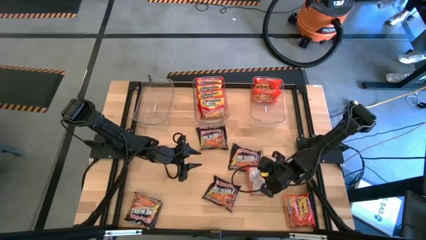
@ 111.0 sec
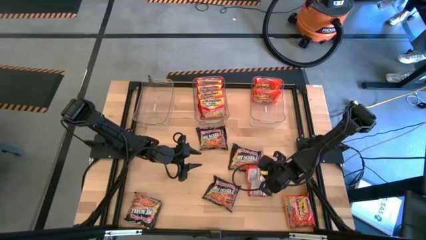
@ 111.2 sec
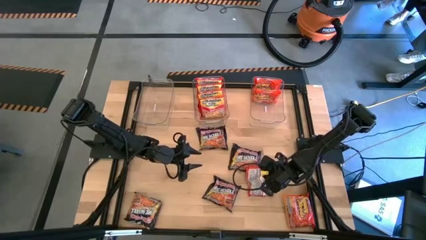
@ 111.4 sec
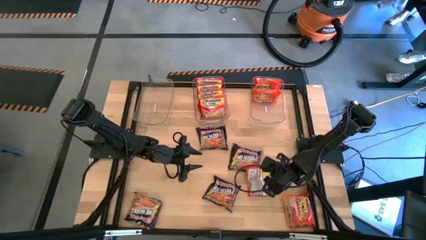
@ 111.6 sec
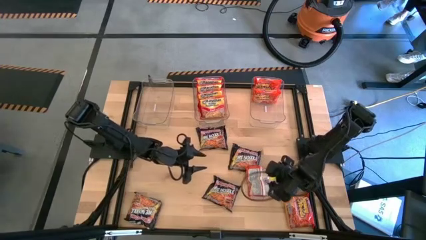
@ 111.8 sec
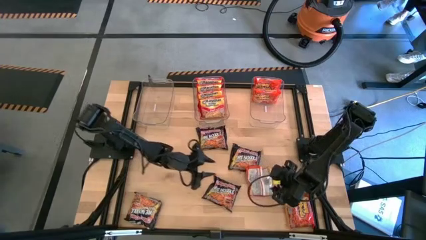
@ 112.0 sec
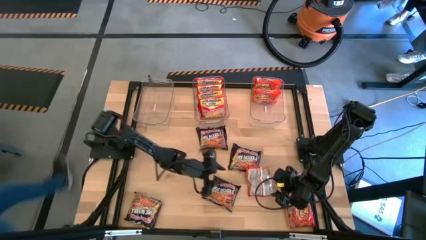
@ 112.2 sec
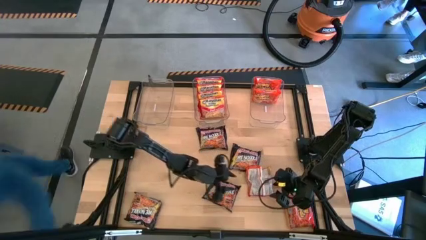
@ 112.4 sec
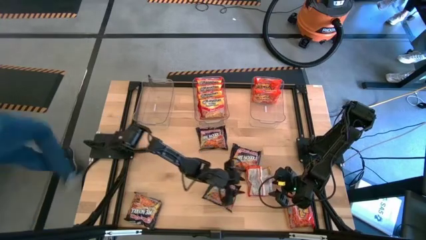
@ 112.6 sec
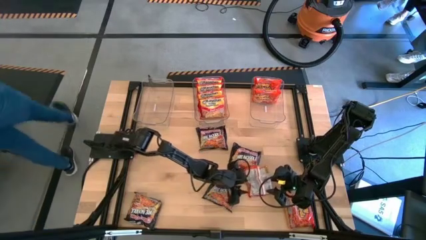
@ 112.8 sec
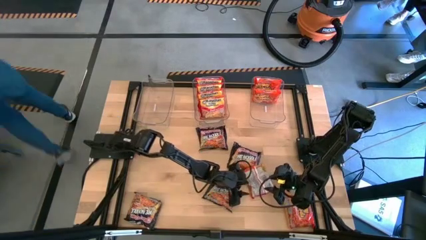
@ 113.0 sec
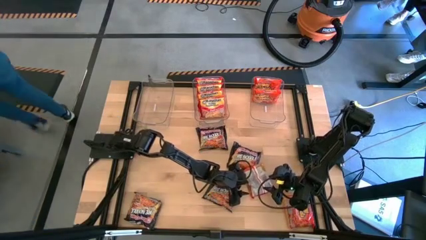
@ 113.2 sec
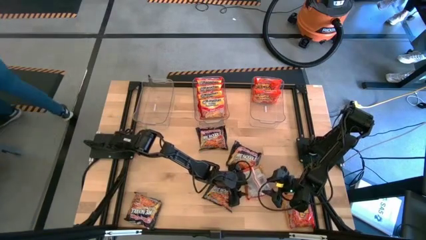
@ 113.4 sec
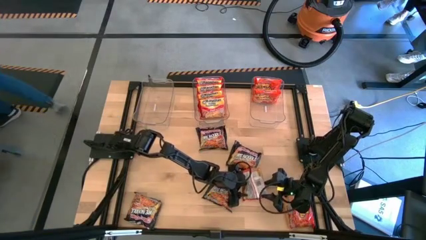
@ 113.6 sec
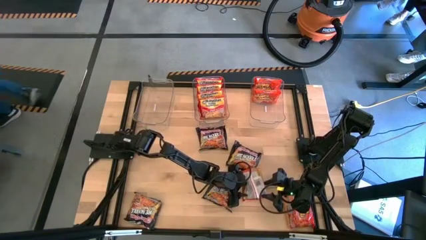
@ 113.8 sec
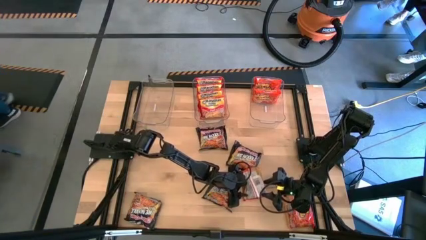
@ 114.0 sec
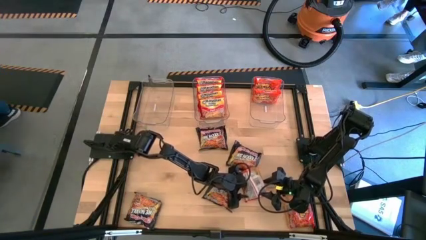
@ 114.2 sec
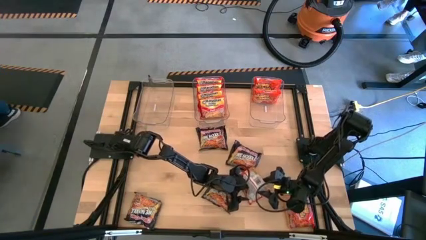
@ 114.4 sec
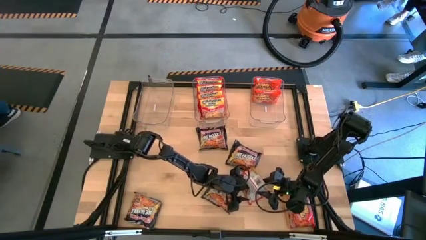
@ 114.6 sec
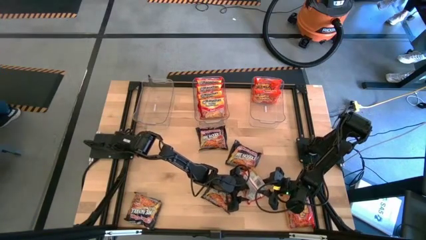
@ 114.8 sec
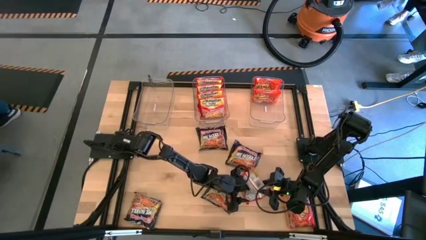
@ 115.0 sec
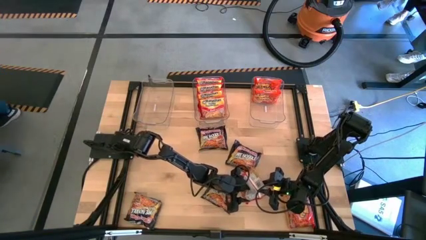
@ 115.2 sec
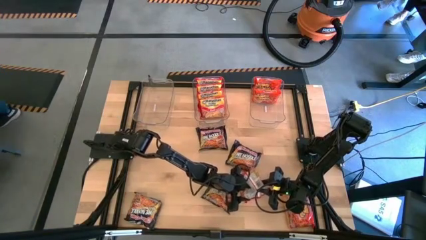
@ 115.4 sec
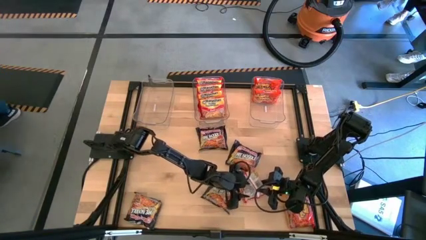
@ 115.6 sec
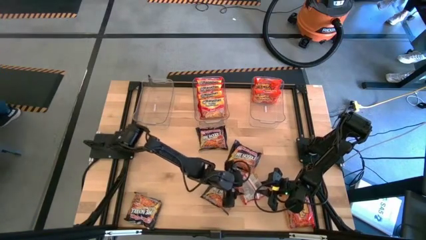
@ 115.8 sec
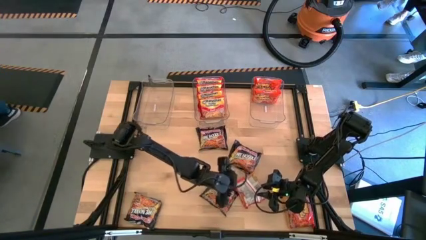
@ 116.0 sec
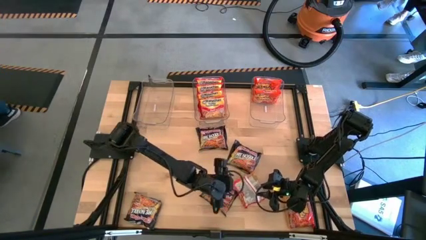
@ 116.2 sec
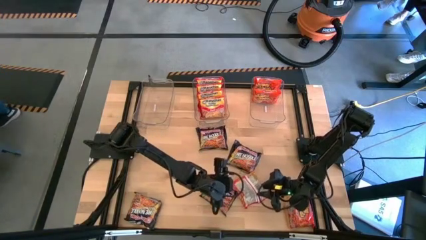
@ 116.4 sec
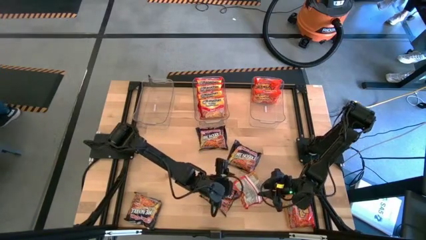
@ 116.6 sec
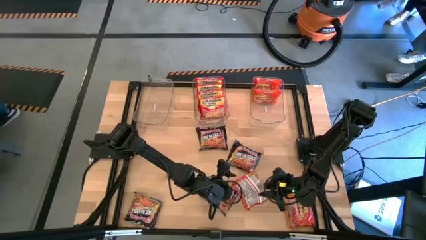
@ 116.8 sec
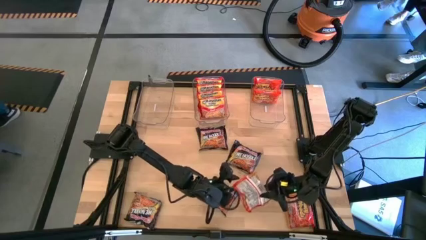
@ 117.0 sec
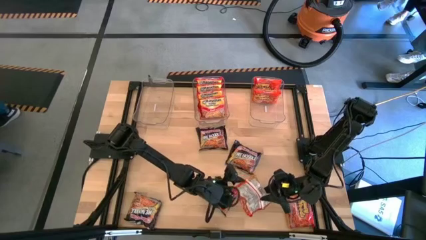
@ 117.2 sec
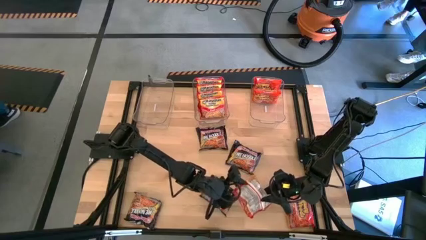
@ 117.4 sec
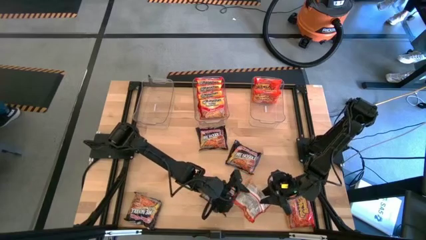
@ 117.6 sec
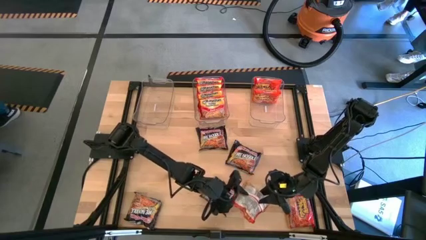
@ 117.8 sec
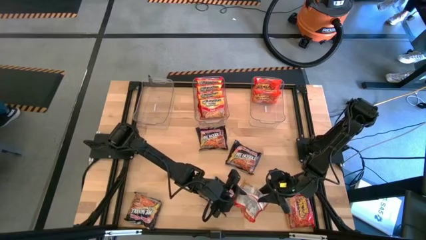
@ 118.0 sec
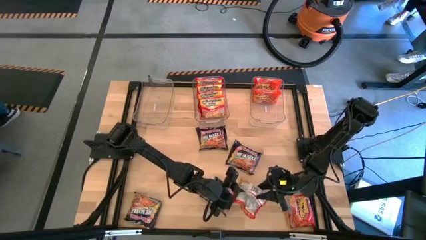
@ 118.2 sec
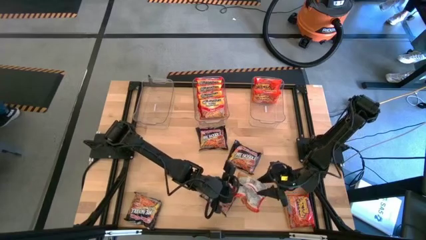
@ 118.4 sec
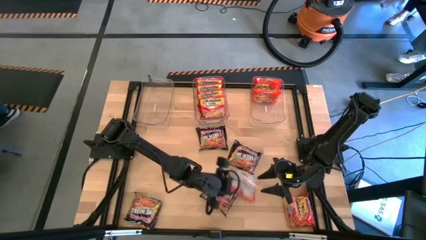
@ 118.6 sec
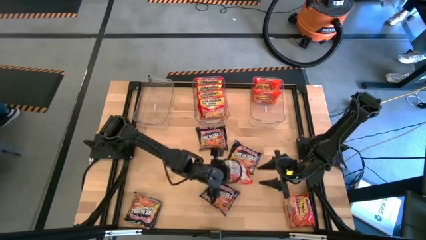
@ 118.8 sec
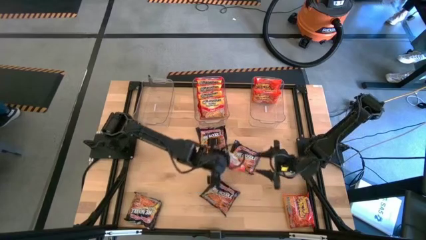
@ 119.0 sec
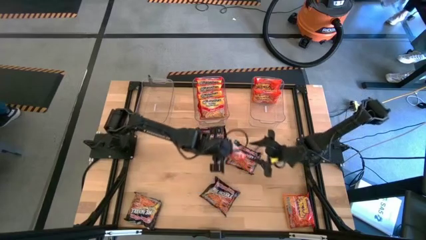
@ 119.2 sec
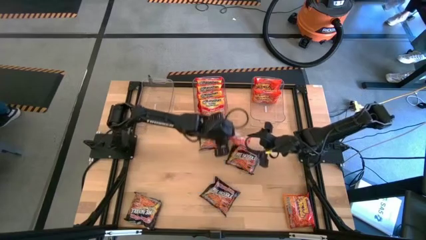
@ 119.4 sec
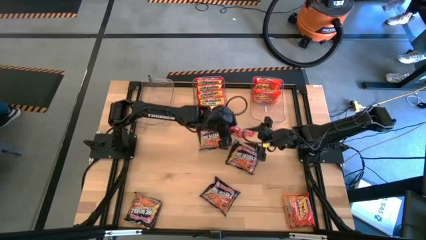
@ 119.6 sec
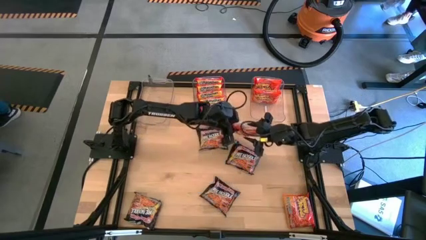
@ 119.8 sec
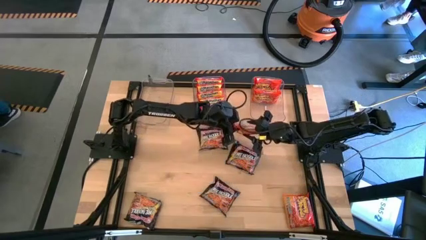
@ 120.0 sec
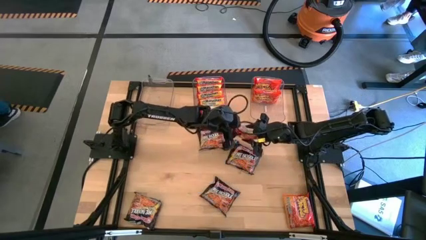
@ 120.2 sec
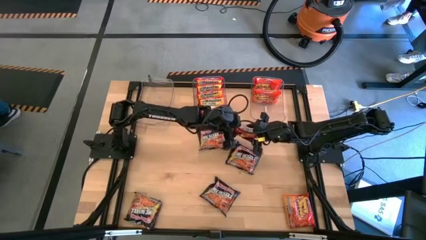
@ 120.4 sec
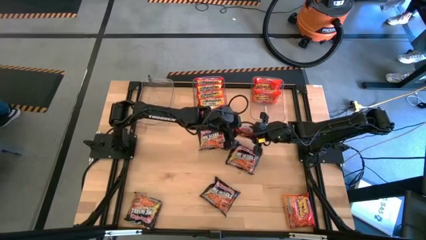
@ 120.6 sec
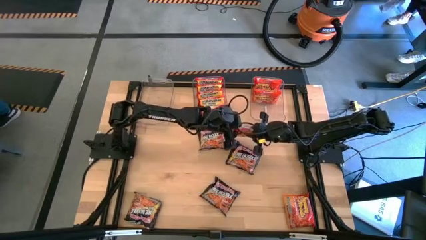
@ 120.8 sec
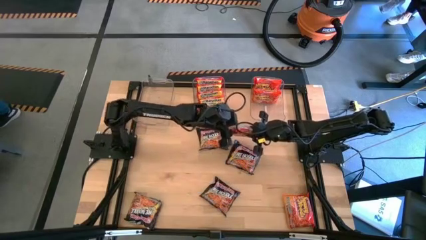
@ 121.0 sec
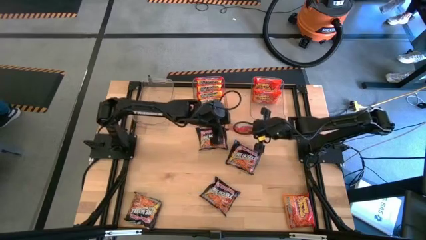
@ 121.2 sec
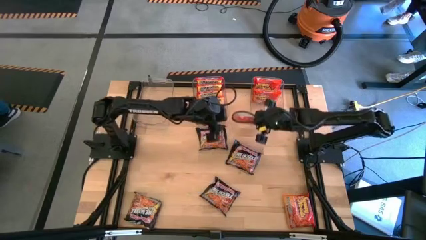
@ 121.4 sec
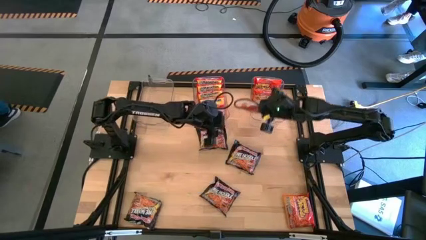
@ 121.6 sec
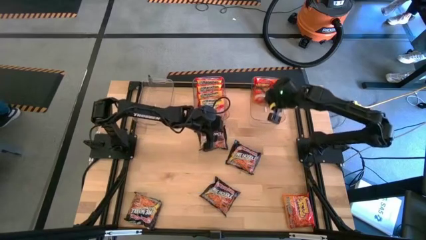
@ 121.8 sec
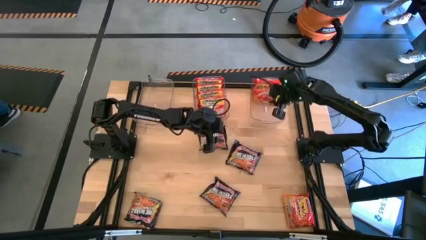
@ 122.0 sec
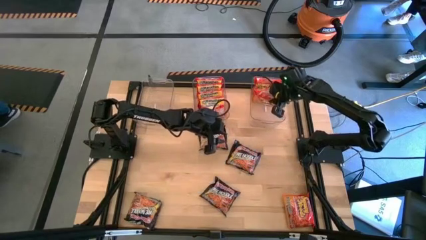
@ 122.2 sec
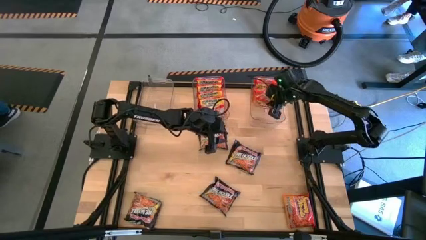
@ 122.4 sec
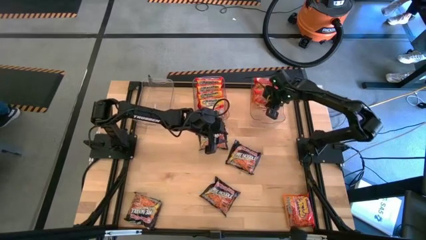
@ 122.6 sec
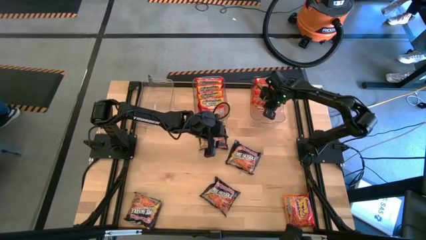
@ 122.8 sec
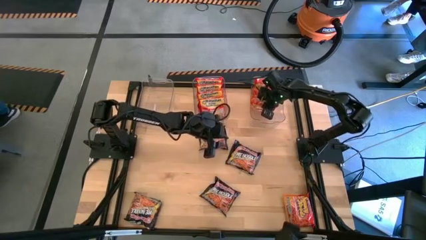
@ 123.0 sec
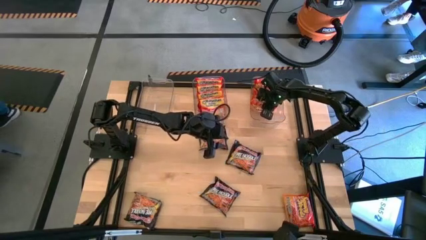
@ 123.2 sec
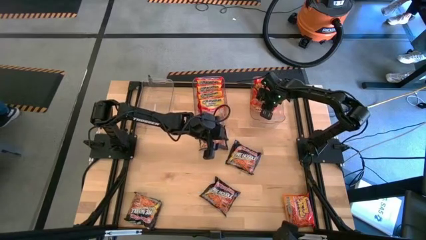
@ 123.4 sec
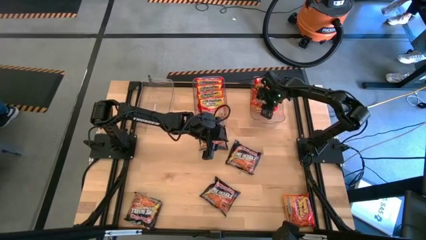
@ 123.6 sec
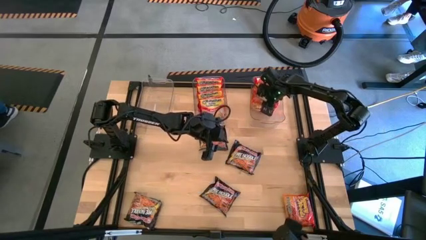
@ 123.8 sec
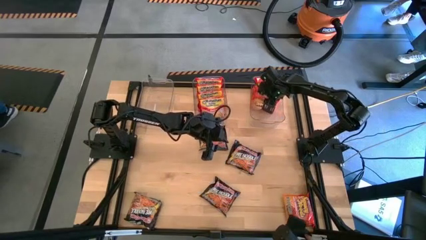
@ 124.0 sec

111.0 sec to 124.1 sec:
Task: Sort Maruchan noodles
Put the top orange noodle pack into the right transparent bin
